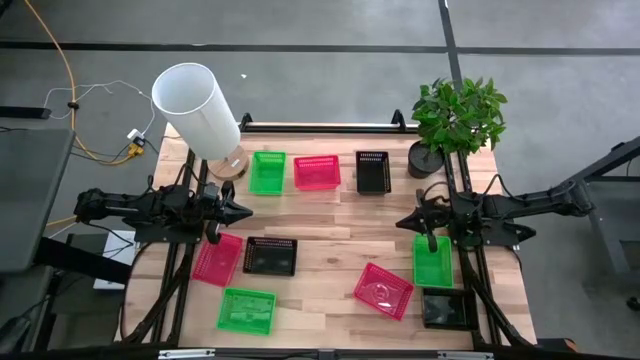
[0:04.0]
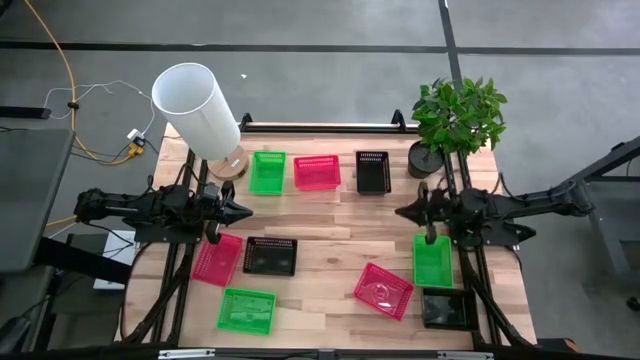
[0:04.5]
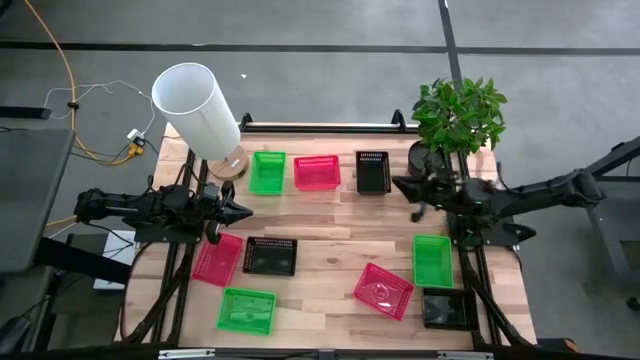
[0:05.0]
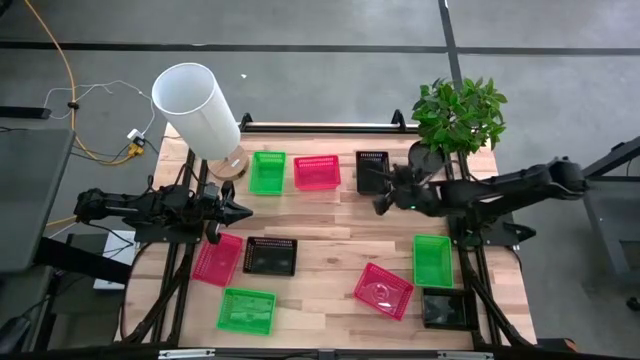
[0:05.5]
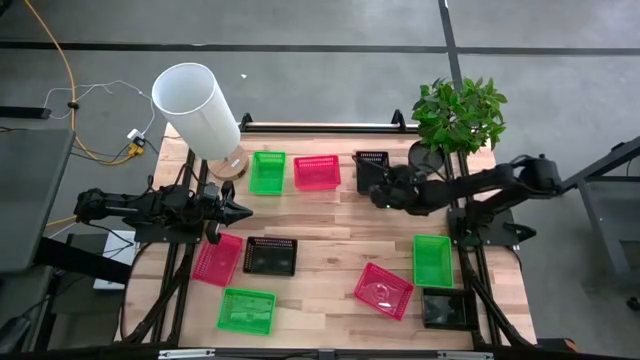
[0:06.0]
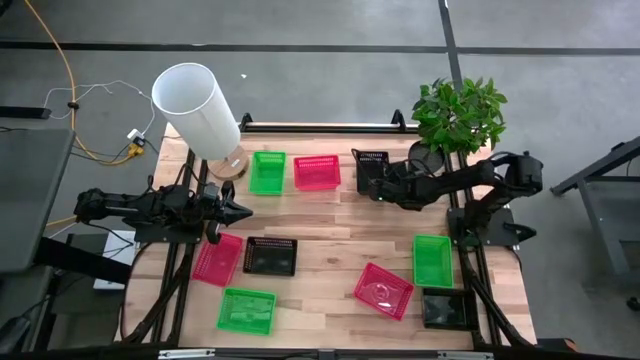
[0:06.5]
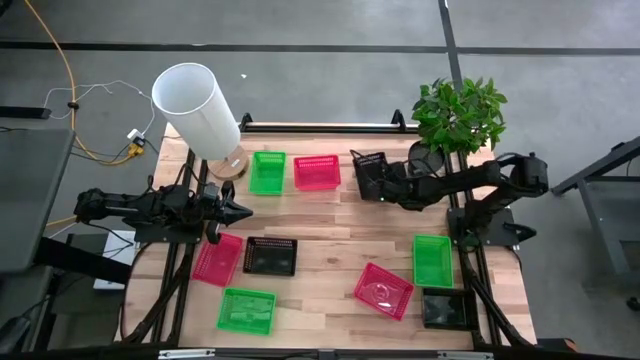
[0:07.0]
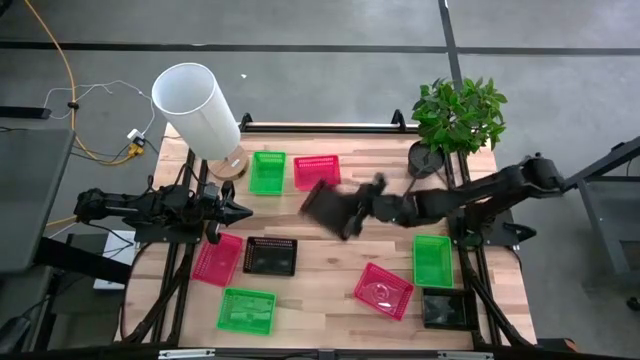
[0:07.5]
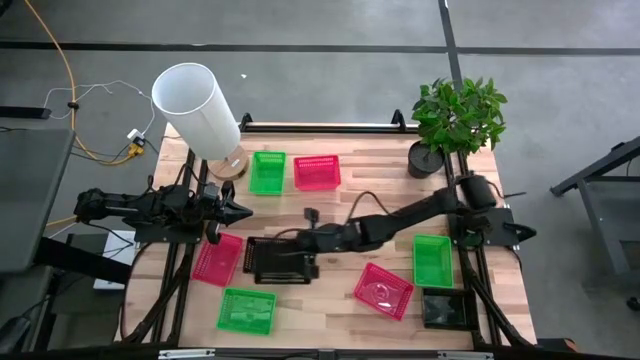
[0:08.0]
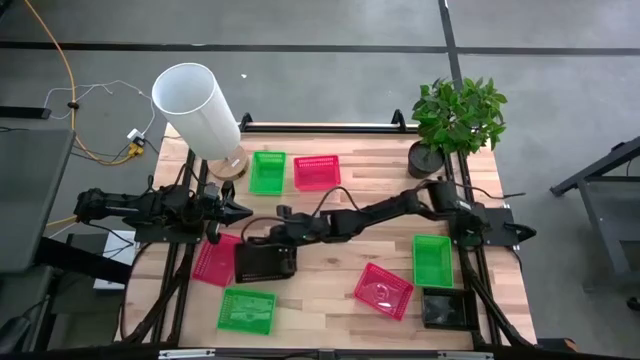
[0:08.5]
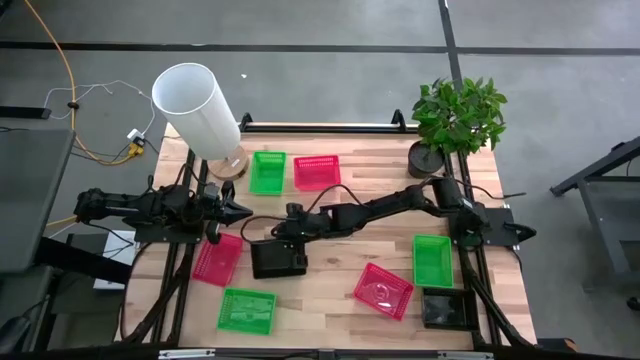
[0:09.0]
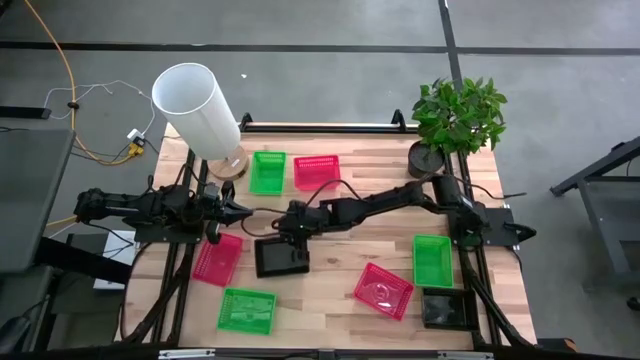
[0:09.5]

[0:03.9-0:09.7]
Stack the top black bin on the black bin

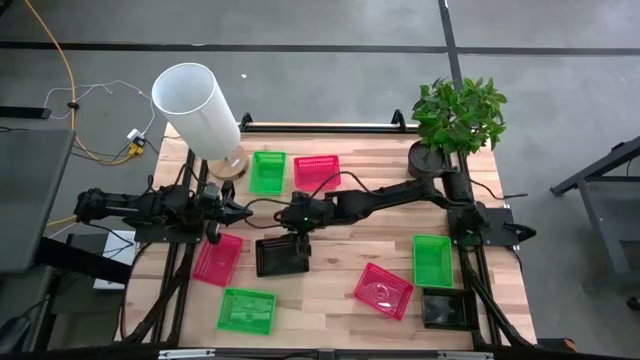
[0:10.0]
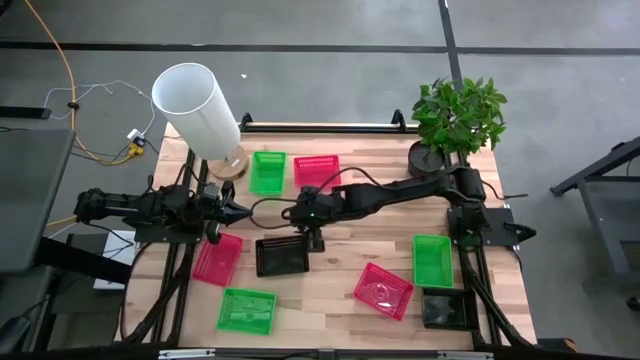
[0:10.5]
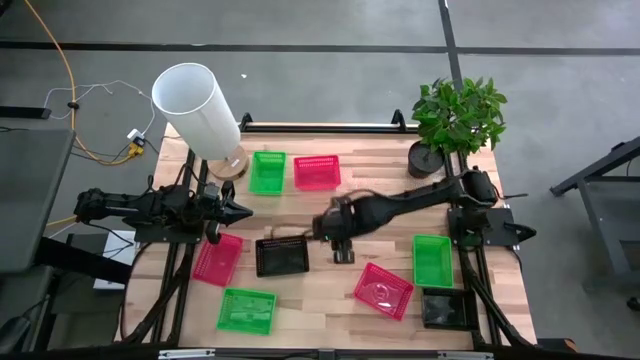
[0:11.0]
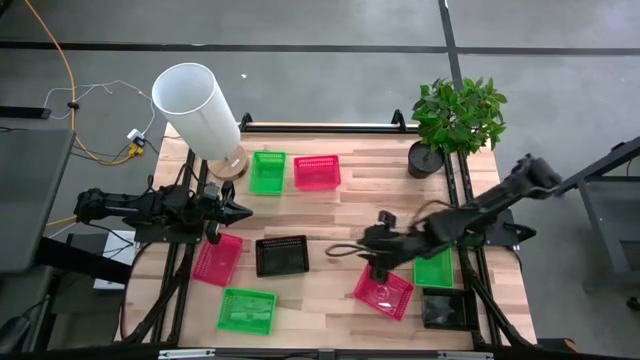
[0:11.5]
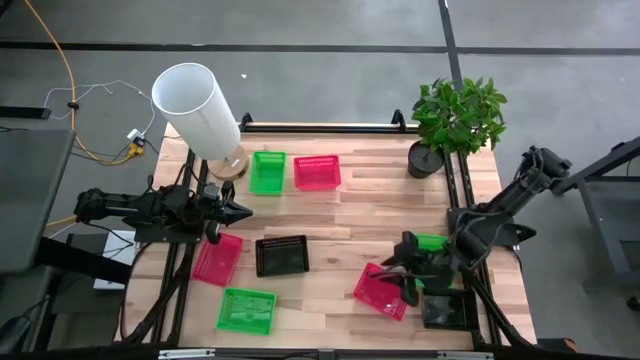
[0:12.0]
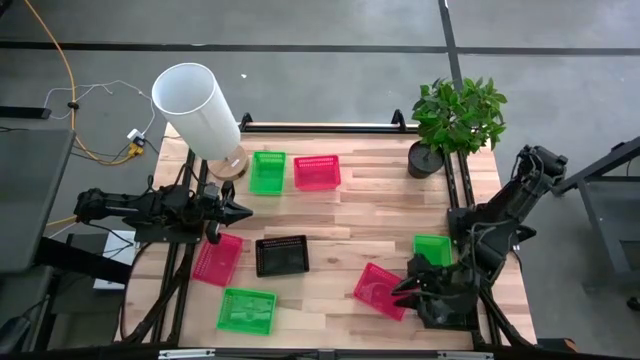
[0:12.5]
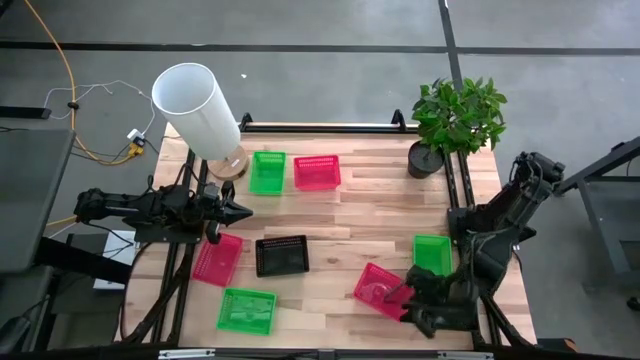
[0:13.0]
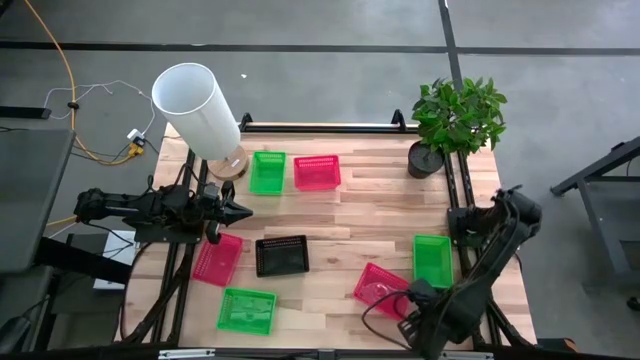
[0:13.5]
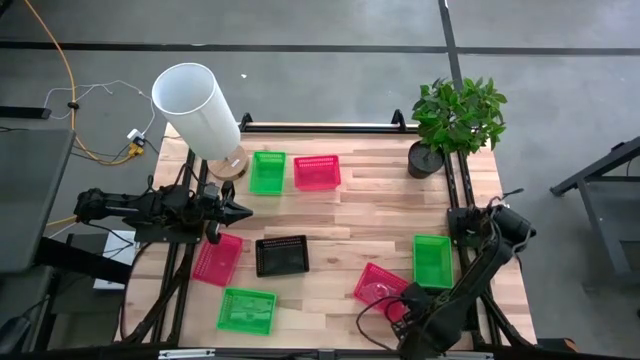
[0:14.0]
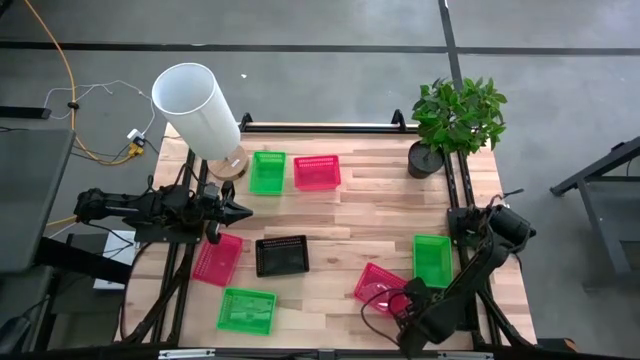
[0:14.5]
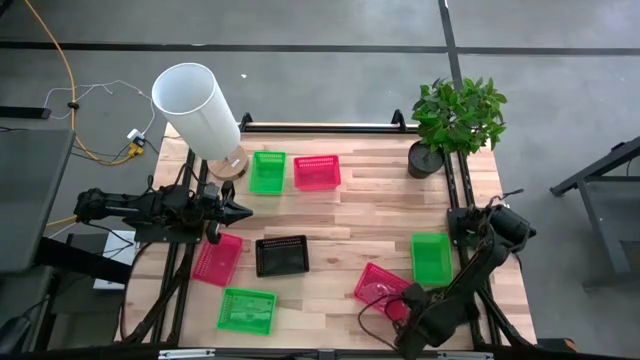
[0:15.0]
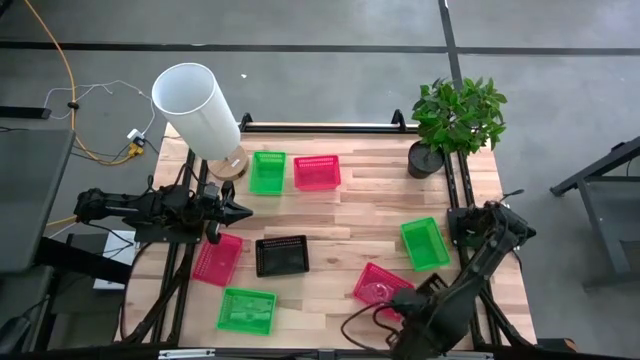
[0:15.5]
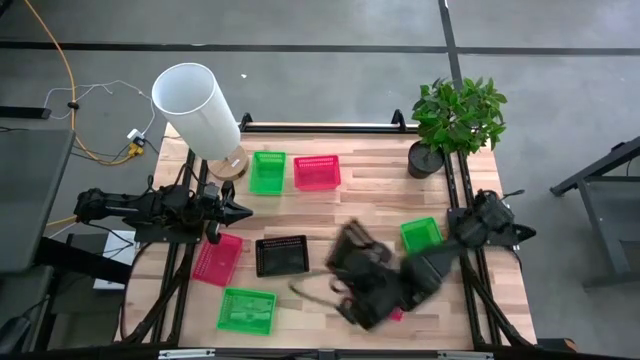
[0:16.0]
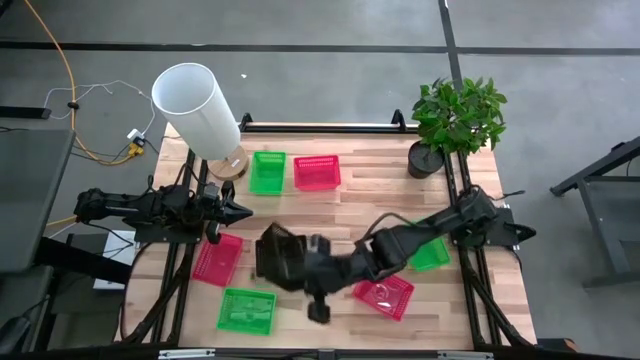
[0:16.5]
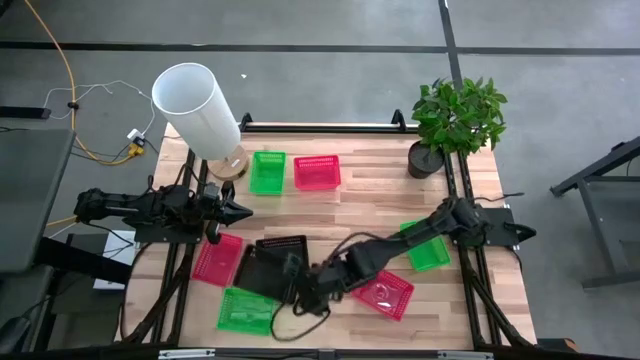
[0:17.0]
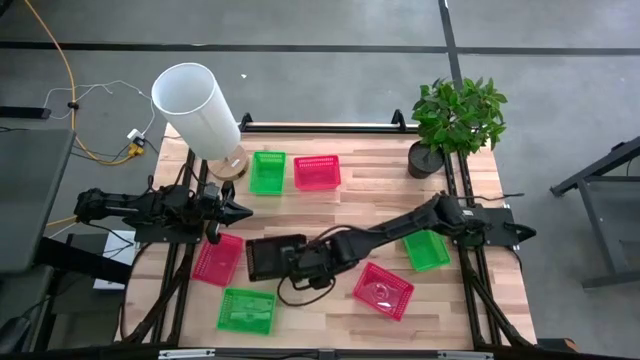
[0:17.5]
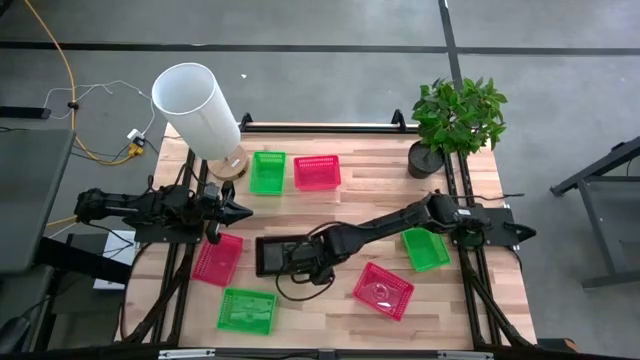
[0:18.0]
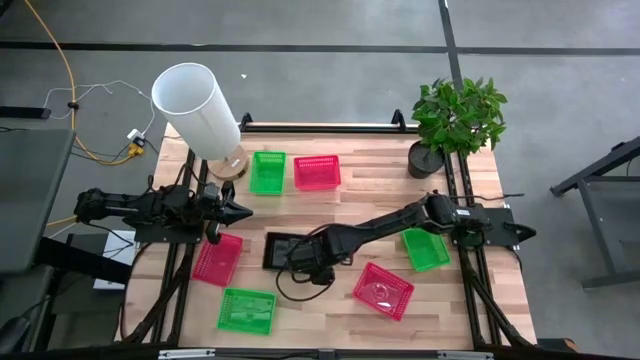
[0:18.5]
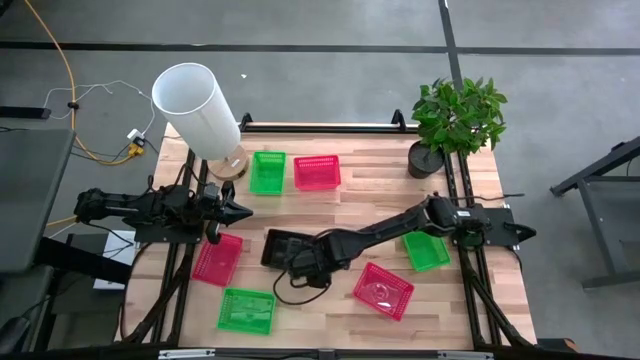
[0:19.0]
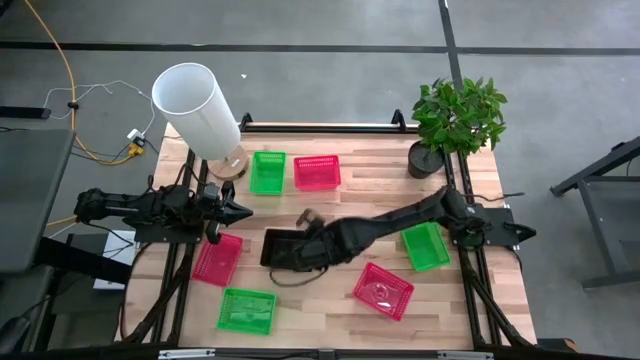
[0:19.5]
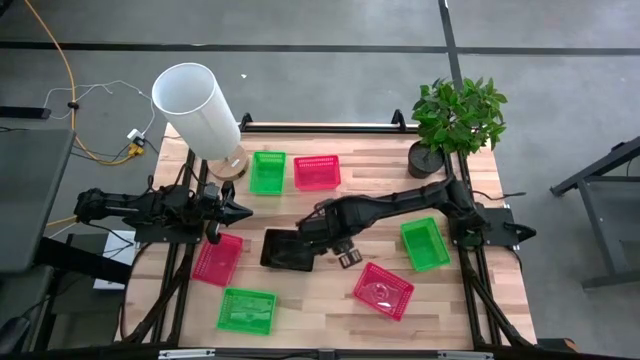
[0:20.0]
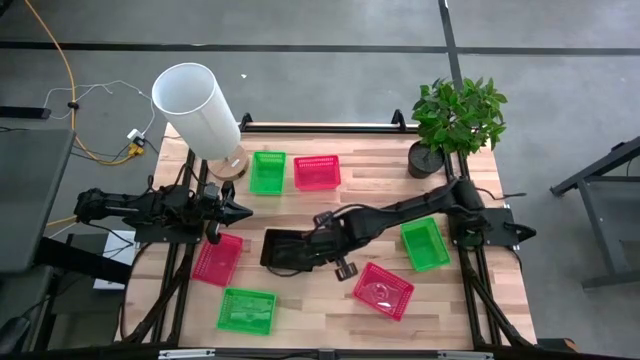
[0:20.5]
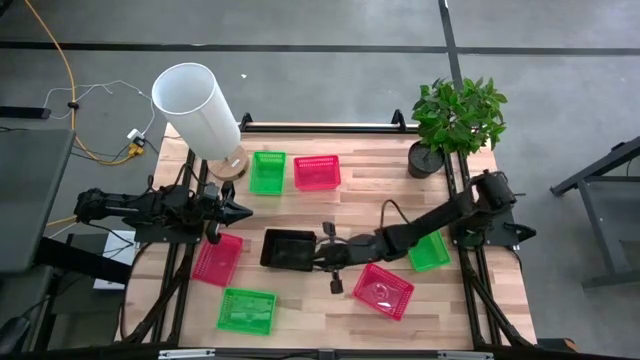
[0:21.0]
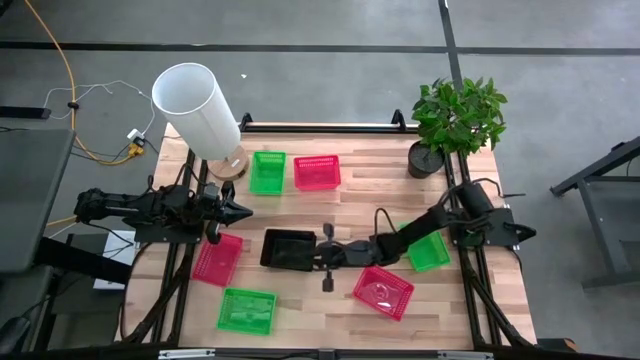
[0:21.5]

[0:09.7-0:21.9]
Stack the right black bin on the left black bin

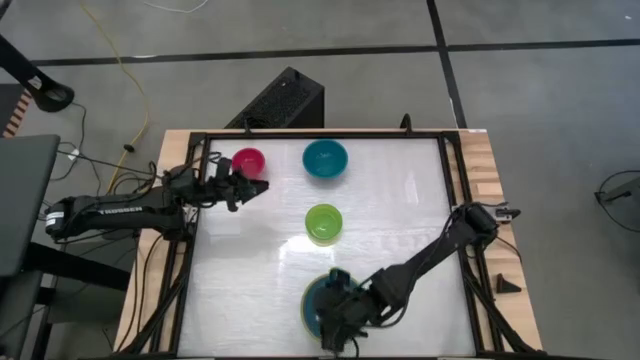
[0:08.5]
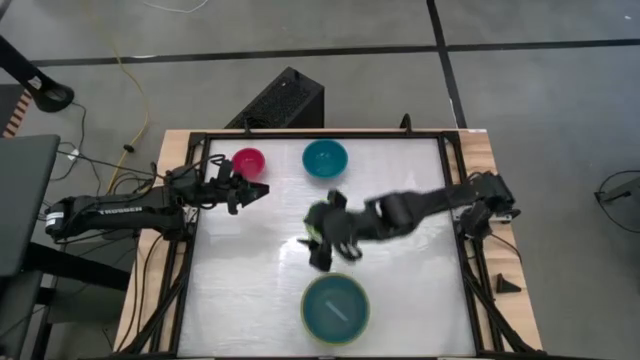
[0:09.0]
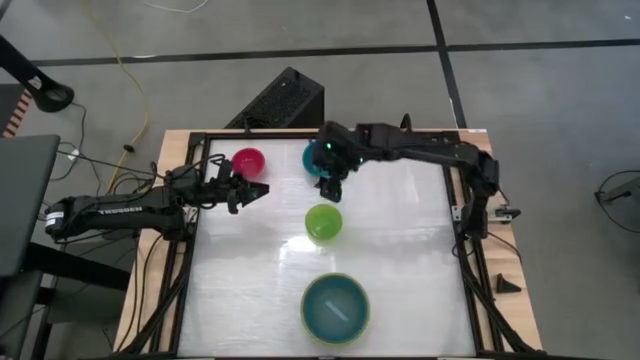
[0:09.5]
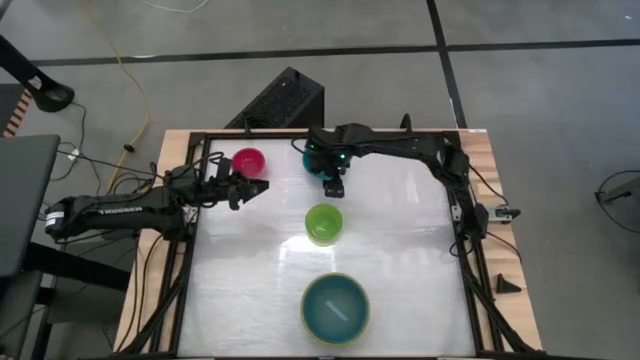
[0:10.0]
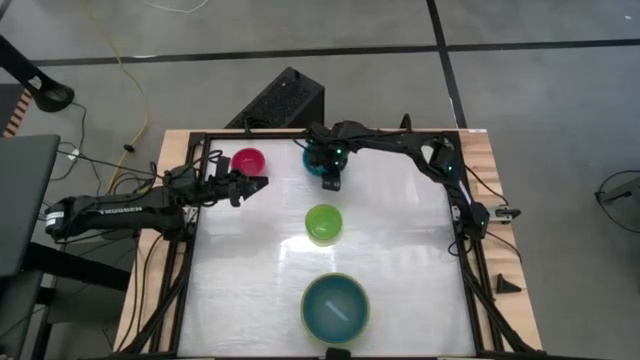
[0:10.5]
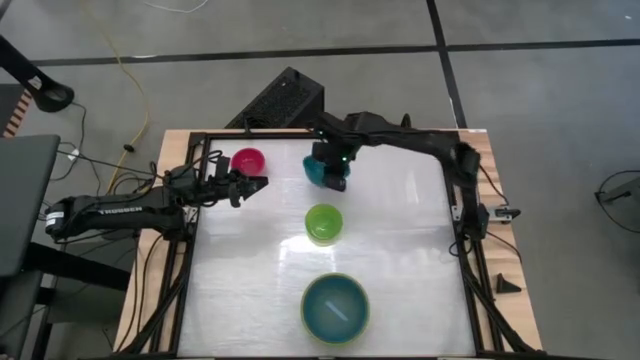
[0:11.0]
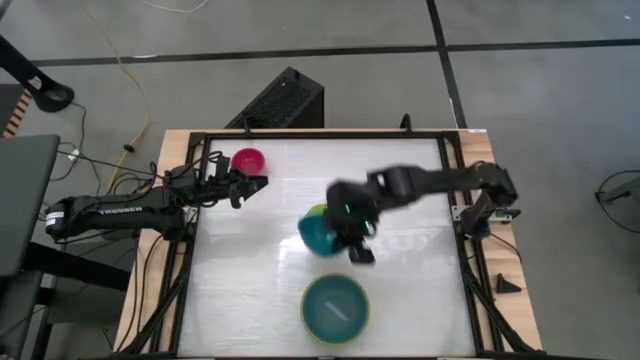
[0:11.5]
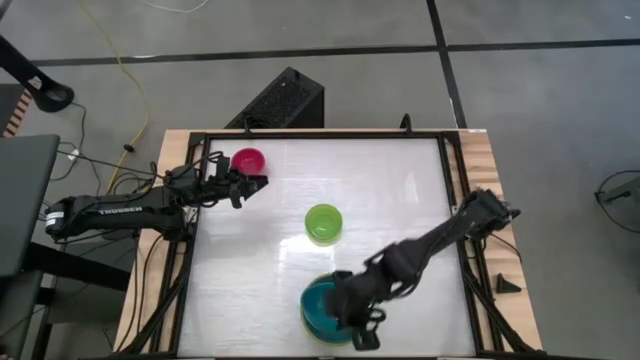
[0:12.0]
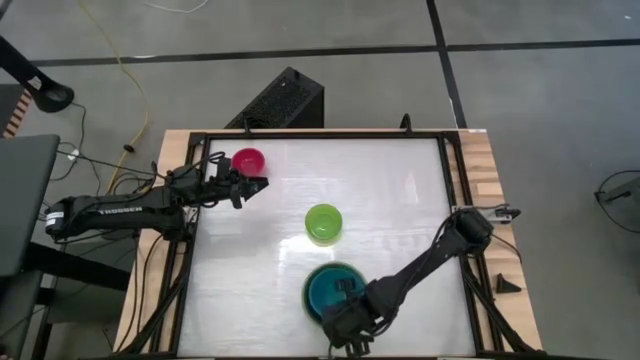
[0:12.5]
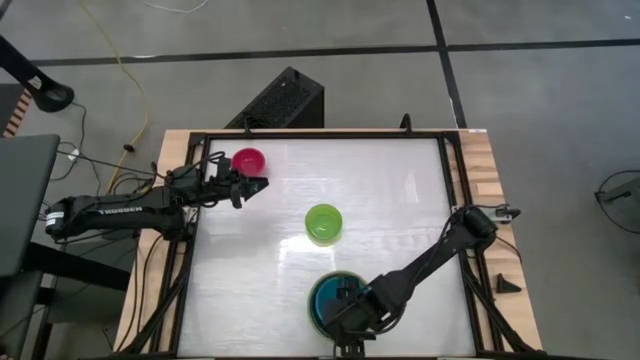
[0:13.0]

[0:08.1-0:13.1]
Stack the blue bowl into the light blue bowl
